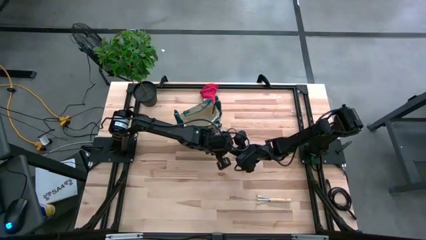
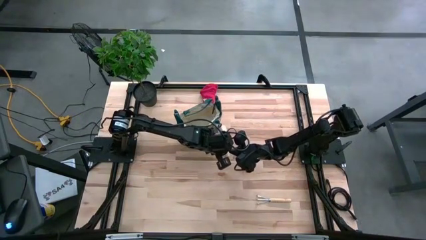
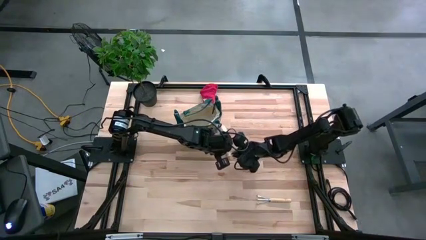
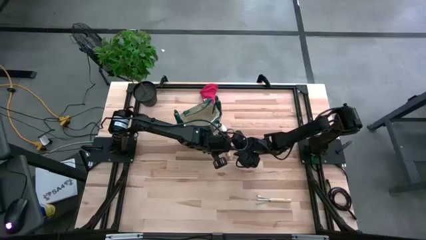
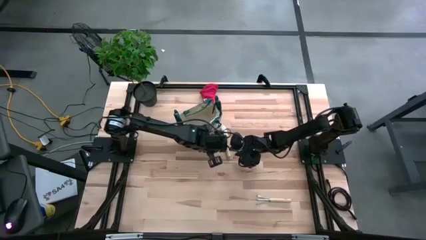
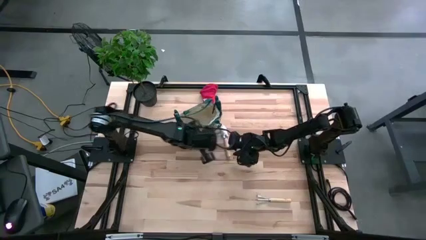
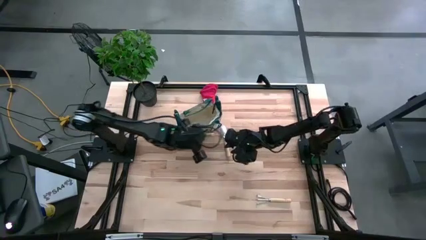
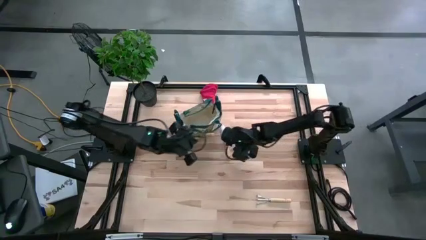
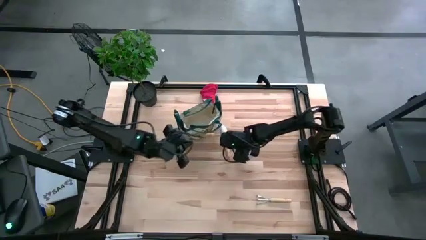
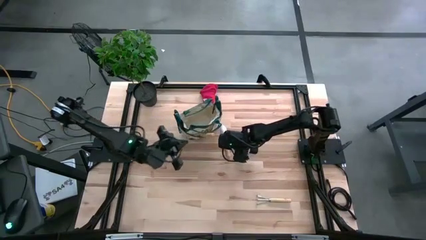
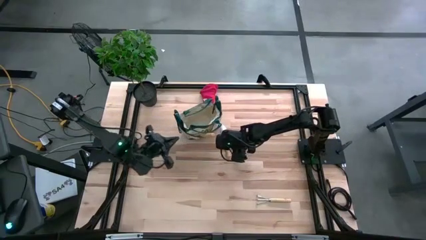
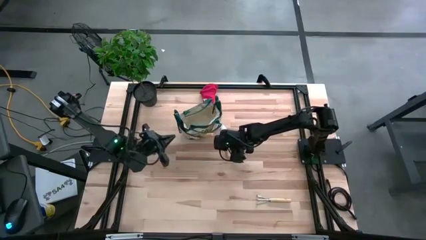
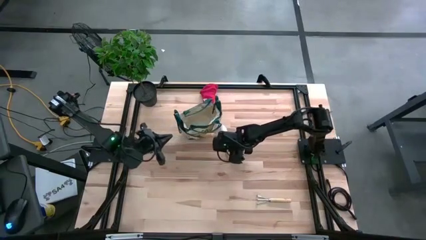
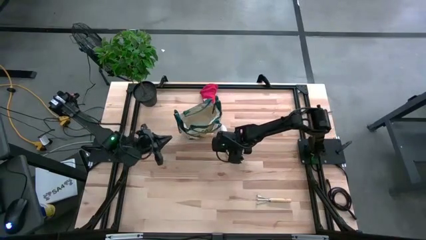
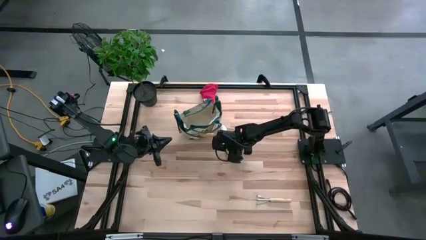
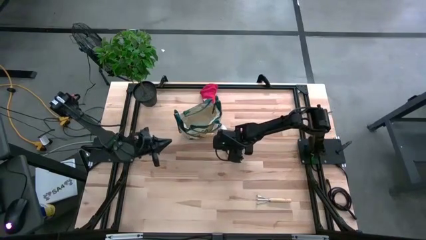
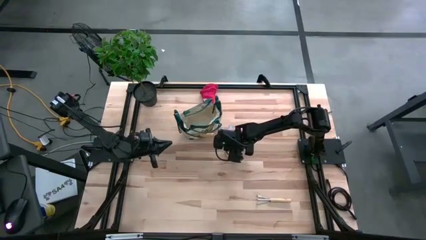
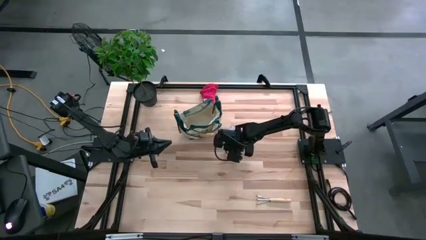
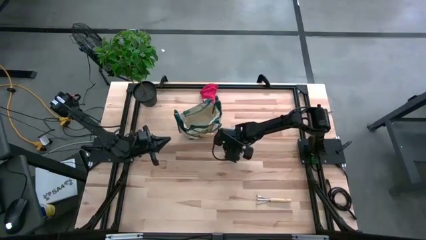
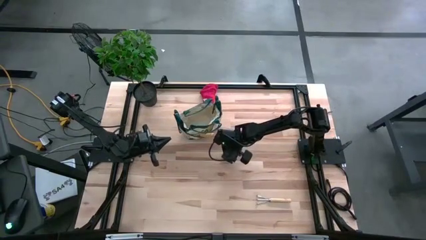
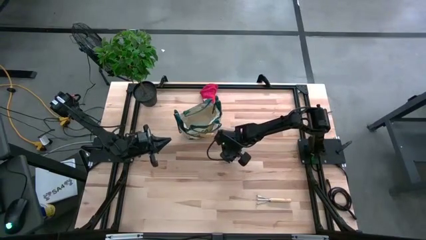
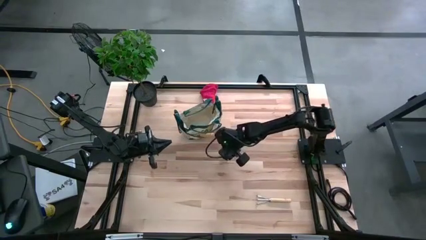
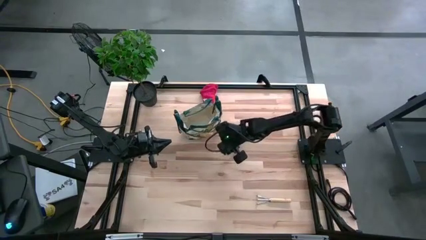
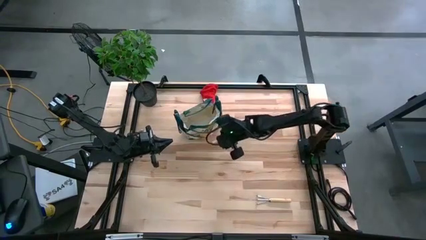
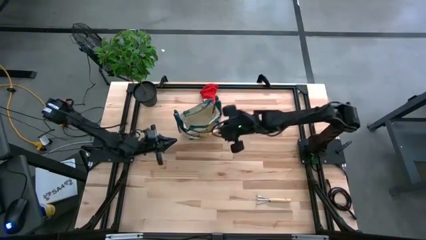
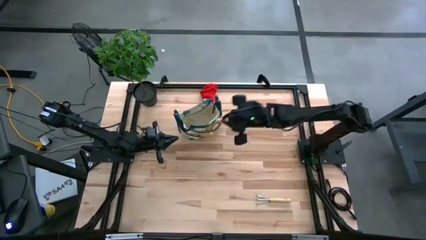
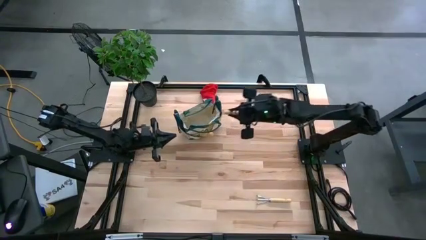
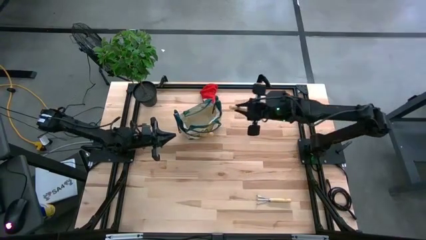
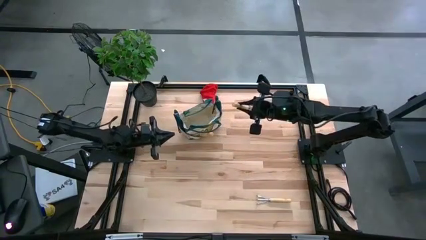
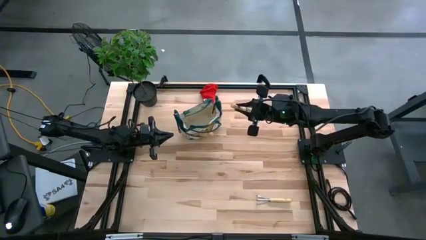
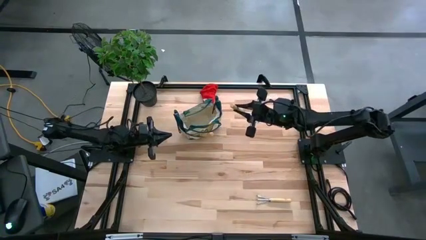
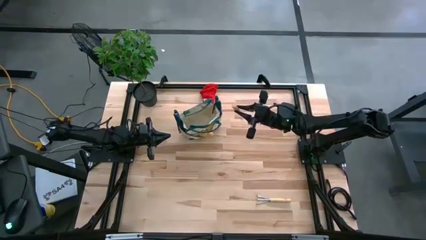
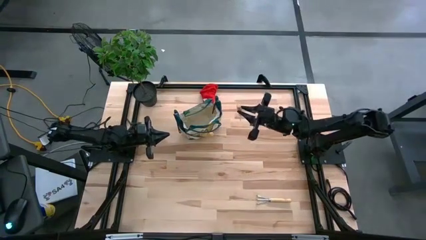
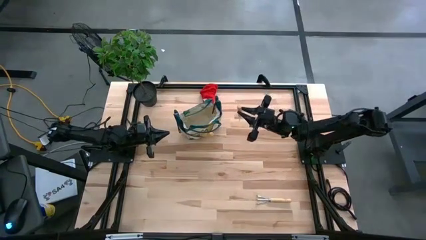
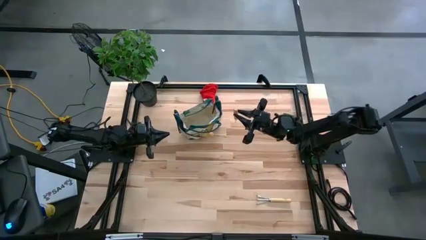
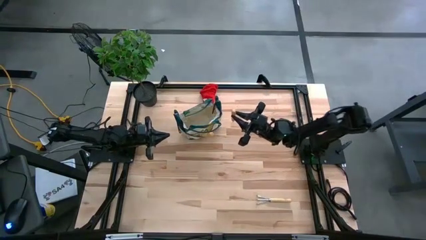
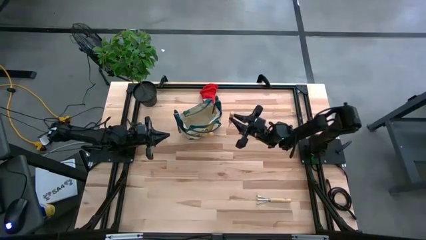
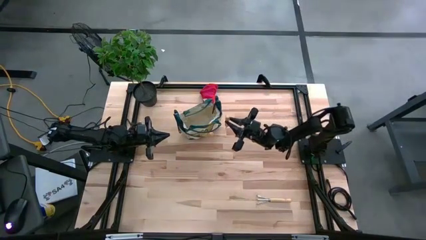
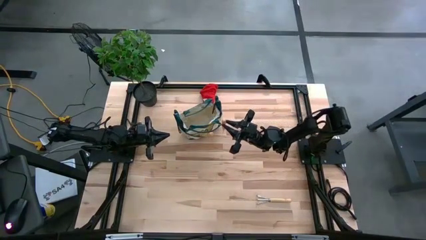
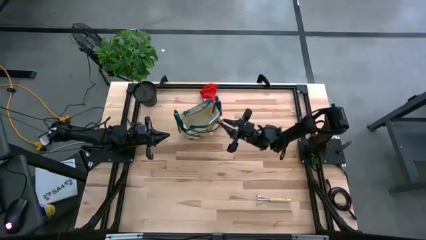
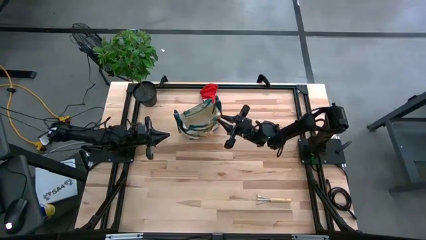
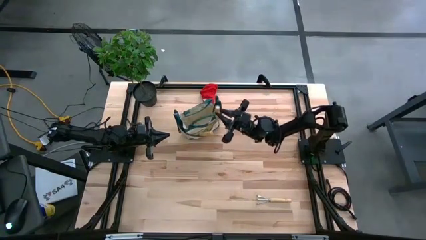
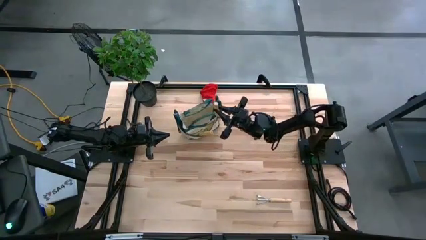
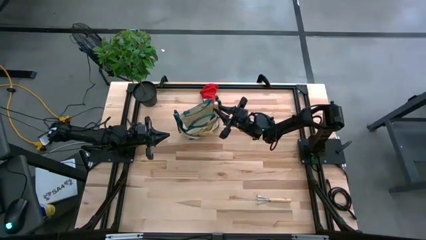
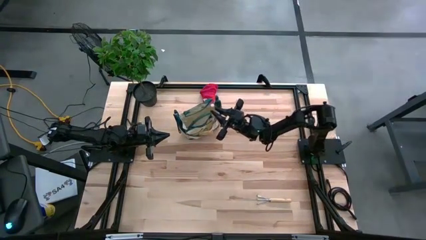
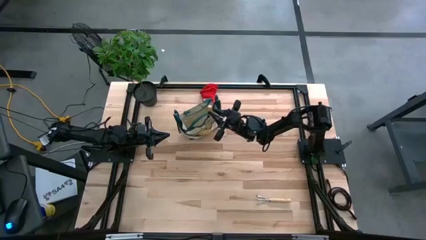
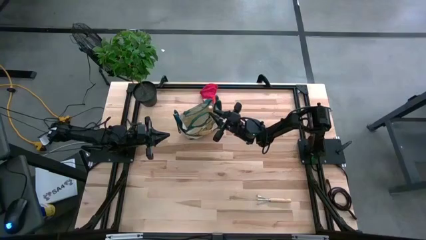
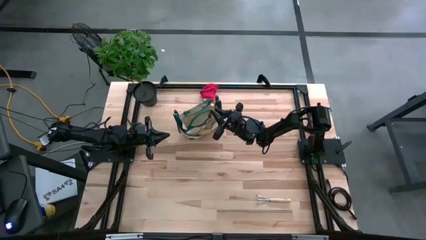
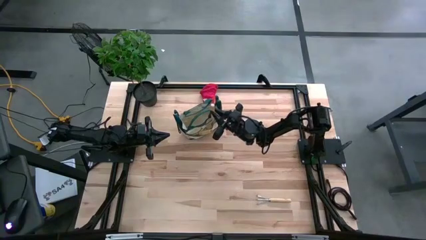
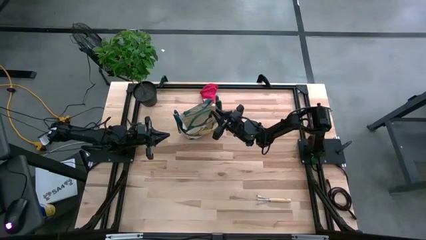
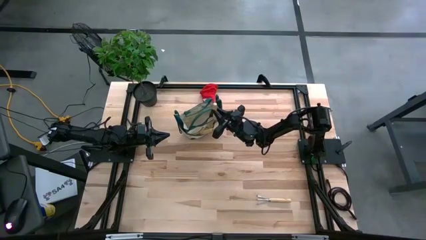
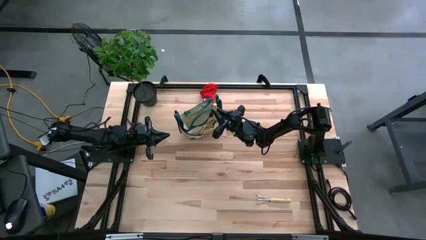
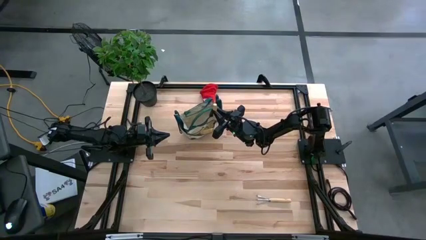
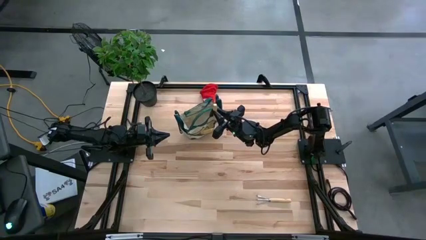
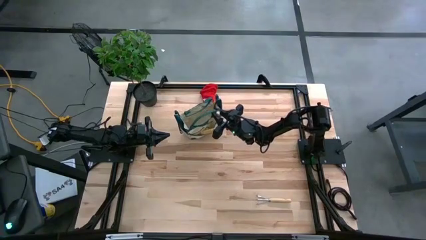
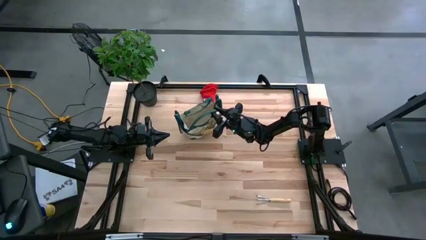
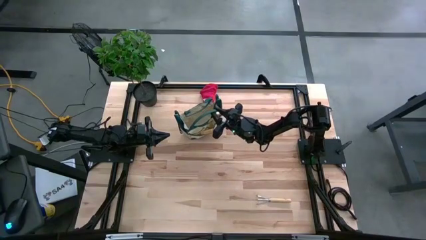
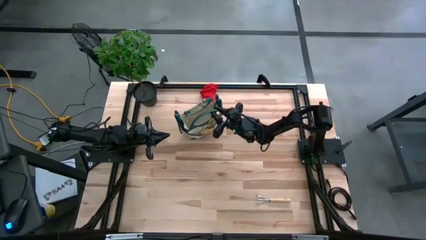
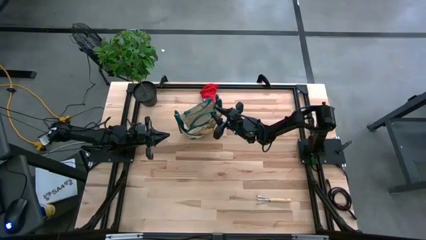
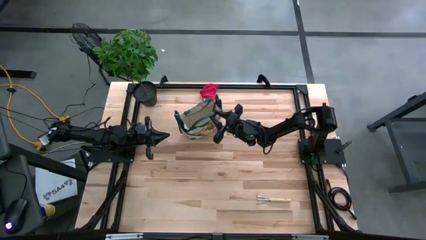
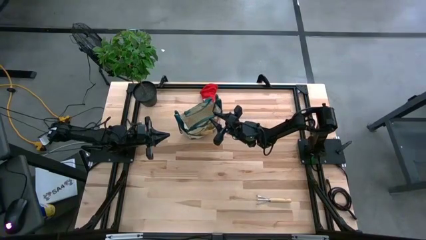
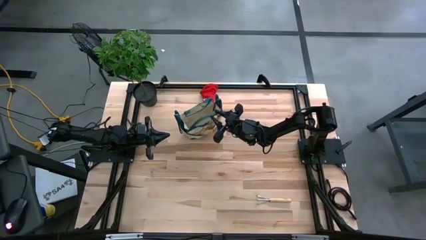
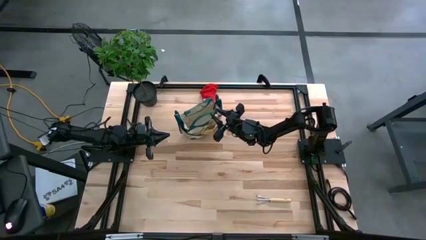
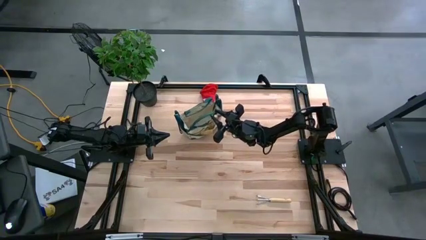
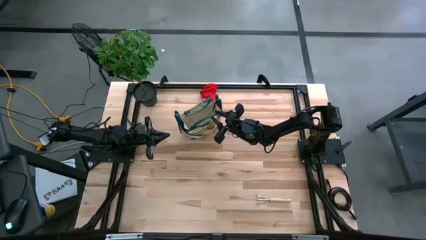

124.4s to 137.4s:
Task: Pick & Place Garden tools in Gardening bag
Put the trowel into the gardening bag

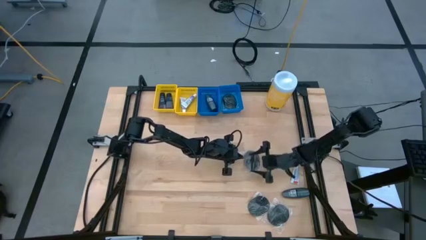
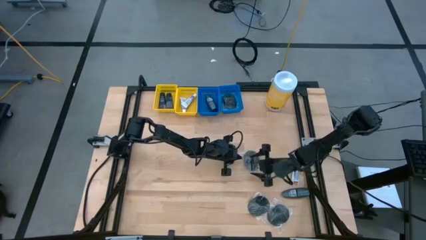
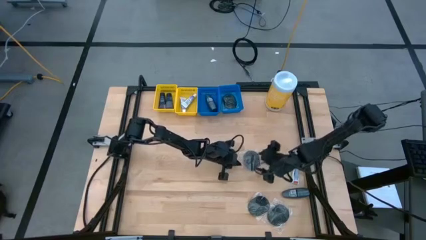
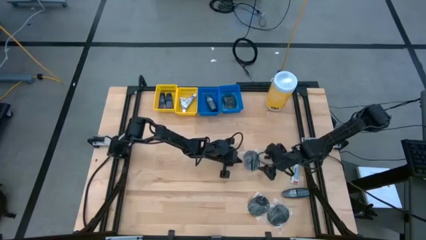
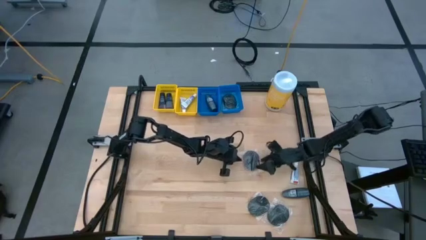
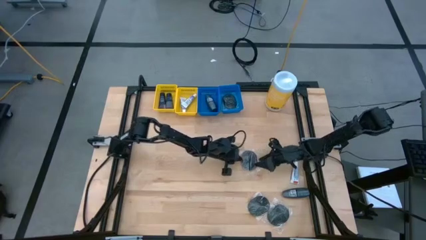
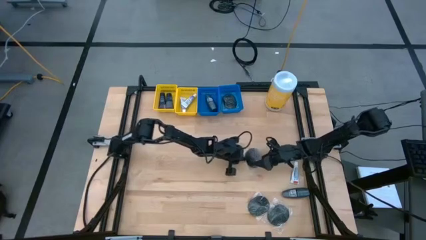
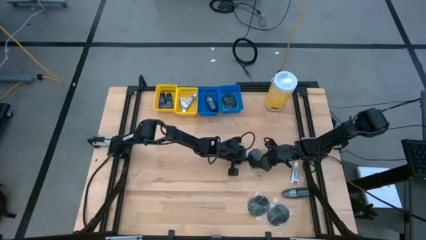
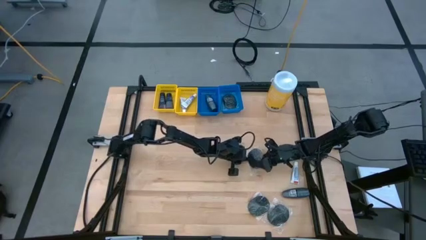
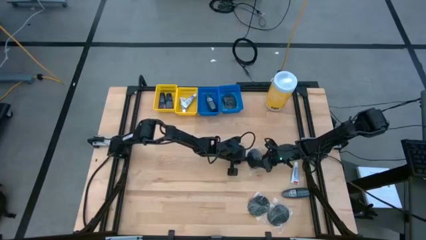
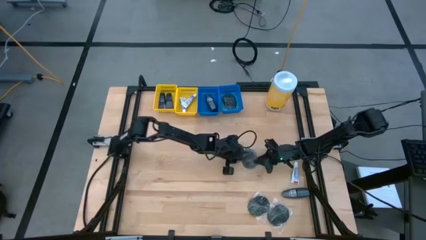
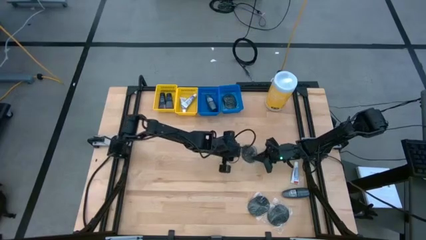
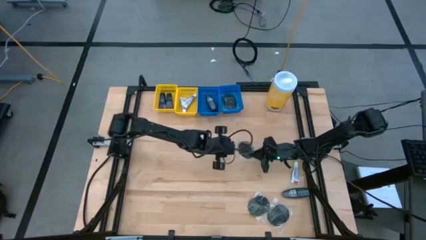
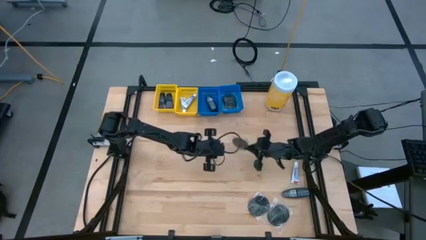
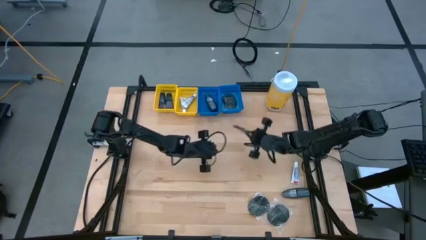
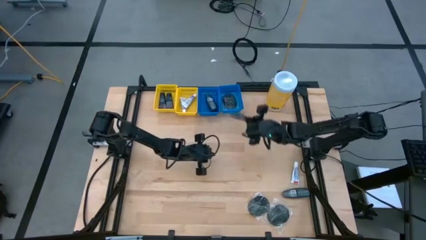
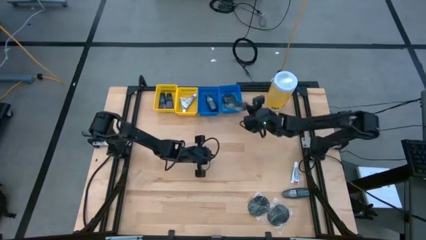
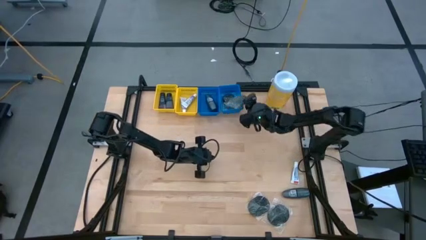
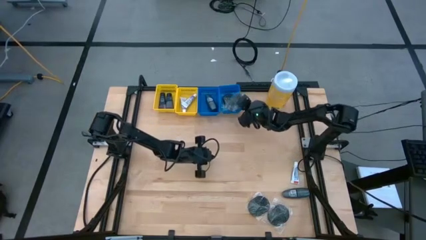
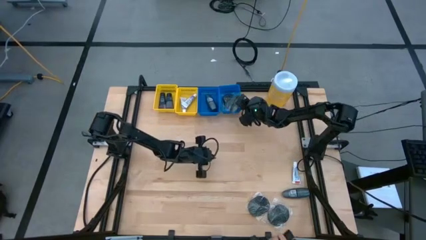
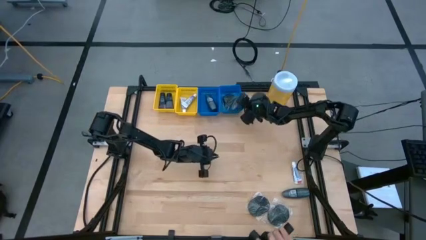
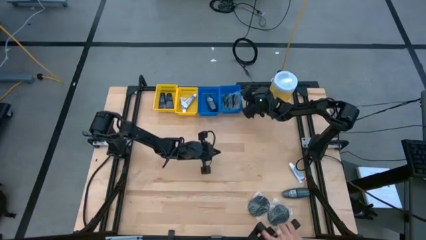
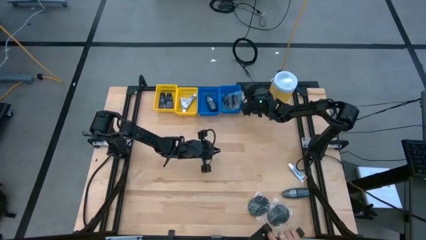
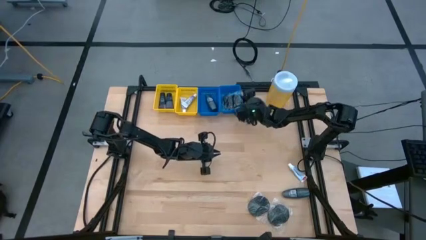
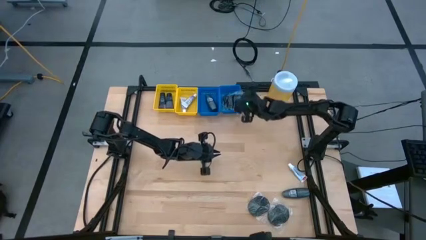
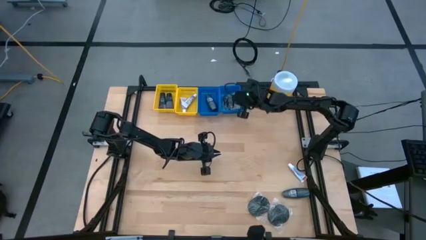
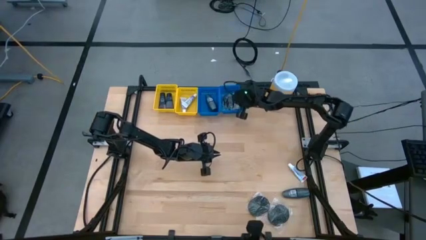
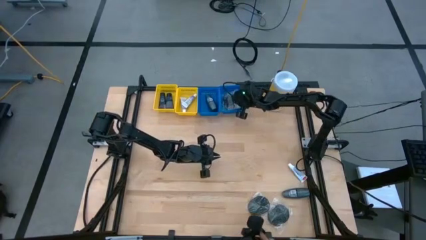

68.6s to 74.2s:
Task: Pick & Place Travel size toiletries
Put the black hairbrush into the right blue bin
